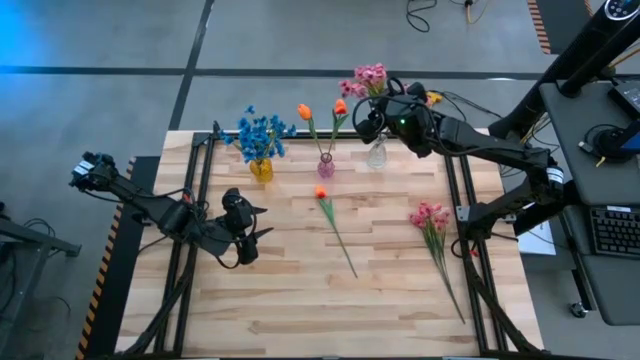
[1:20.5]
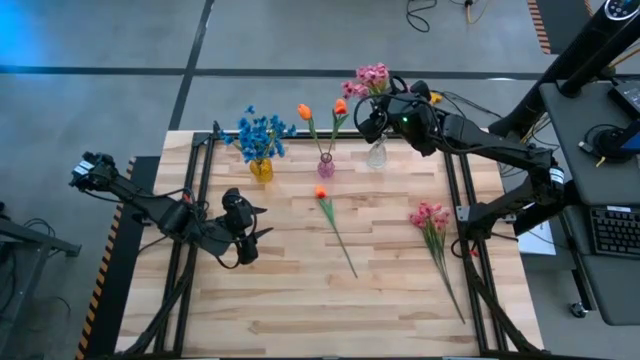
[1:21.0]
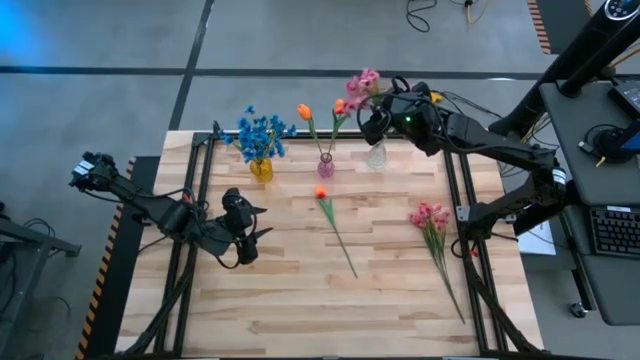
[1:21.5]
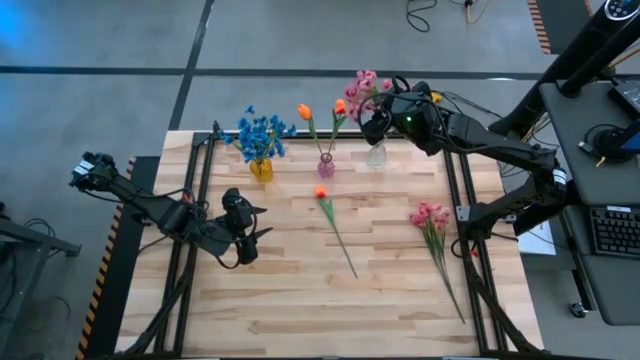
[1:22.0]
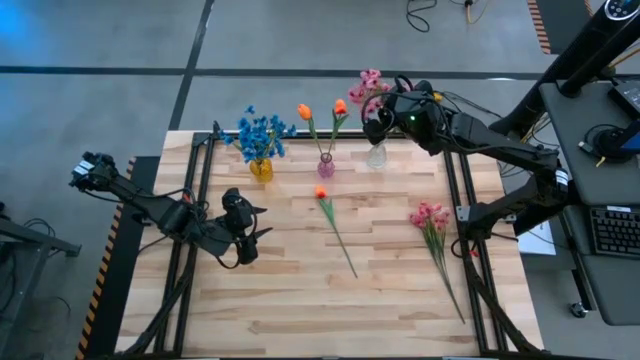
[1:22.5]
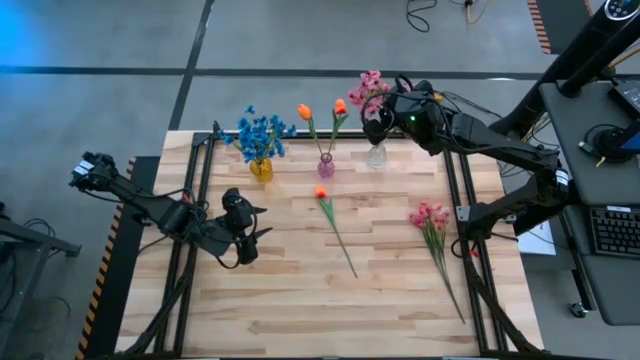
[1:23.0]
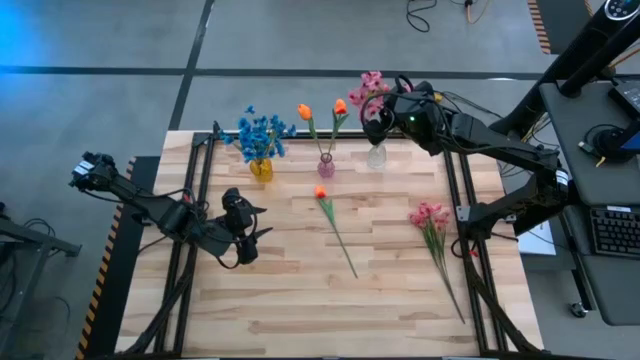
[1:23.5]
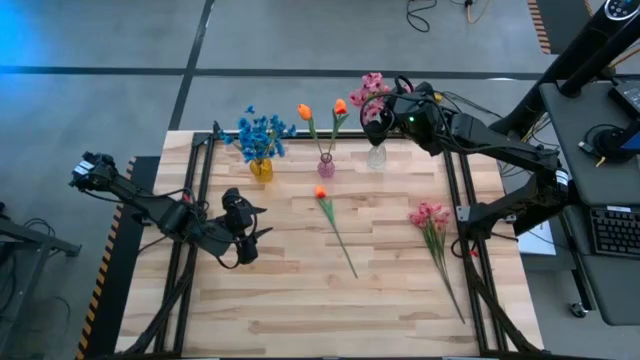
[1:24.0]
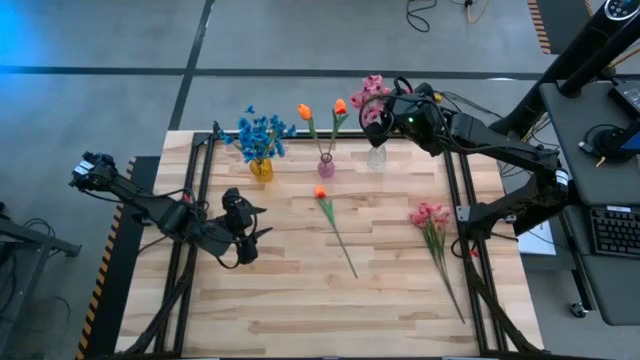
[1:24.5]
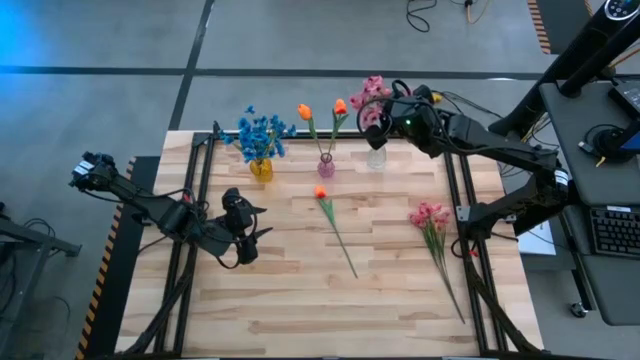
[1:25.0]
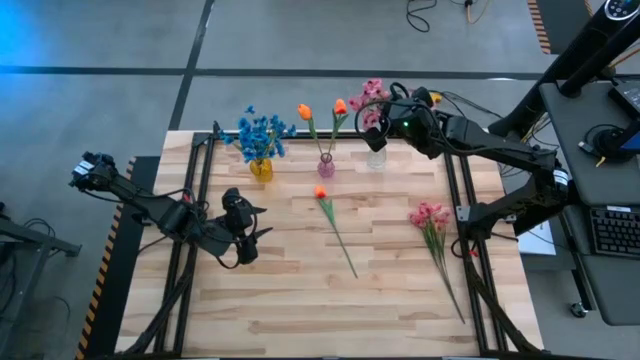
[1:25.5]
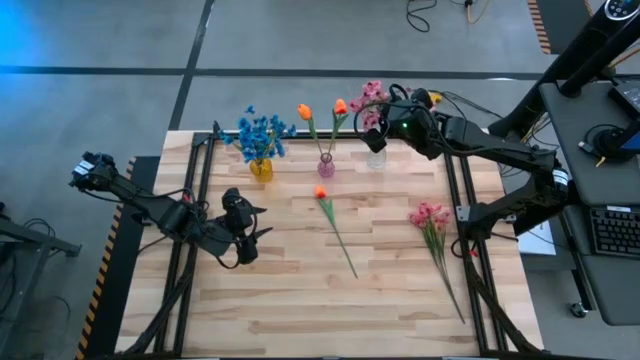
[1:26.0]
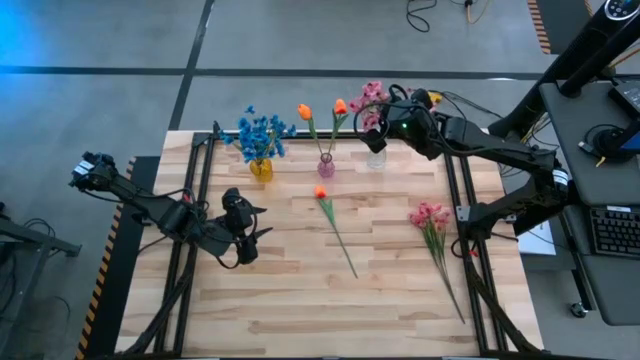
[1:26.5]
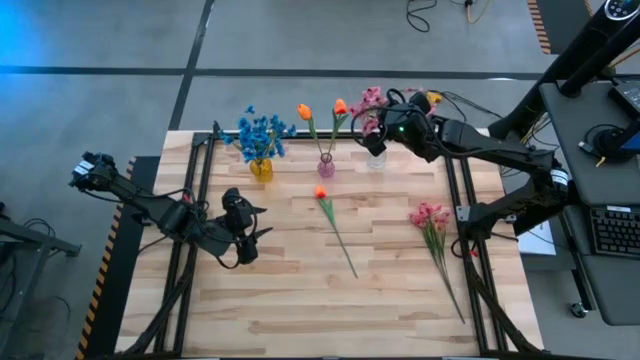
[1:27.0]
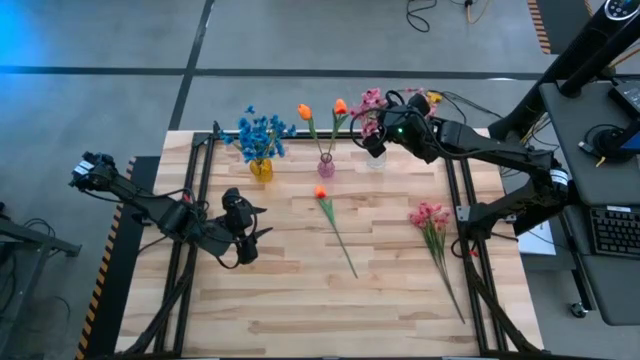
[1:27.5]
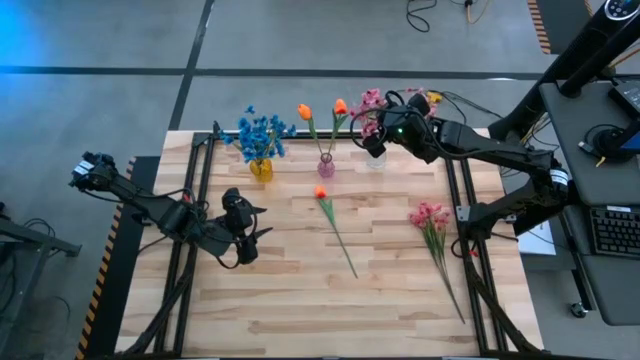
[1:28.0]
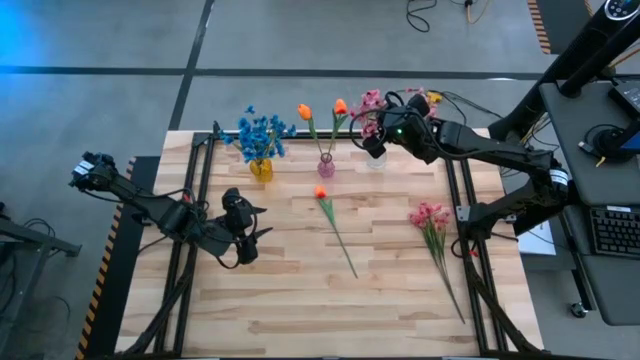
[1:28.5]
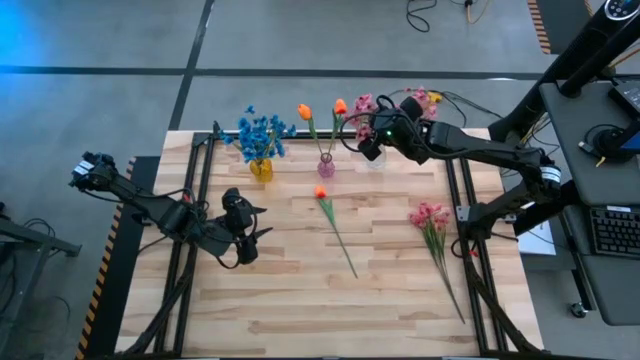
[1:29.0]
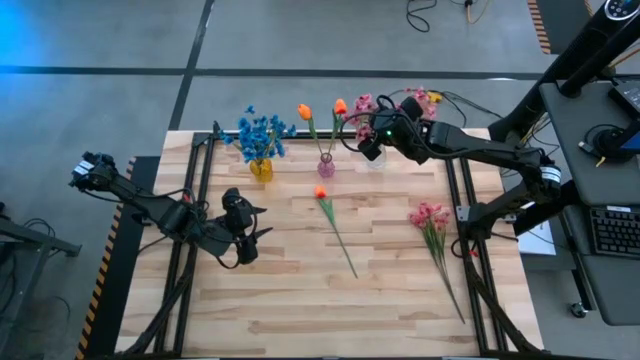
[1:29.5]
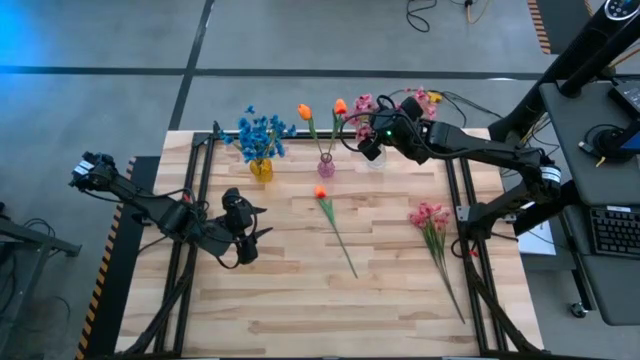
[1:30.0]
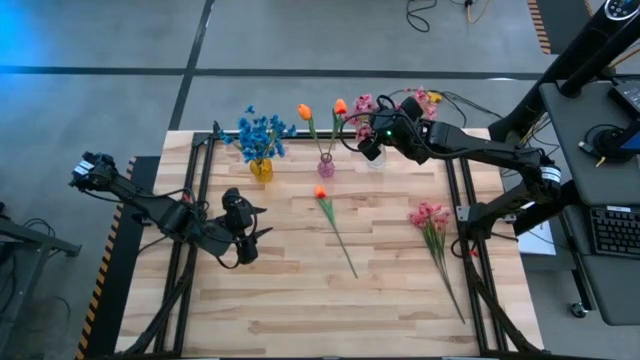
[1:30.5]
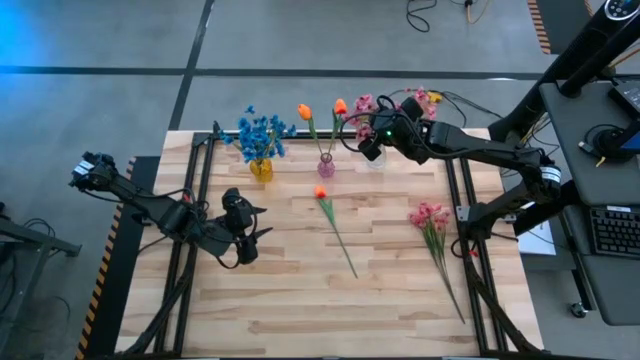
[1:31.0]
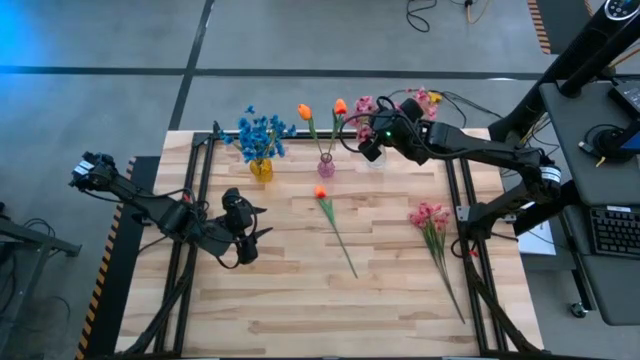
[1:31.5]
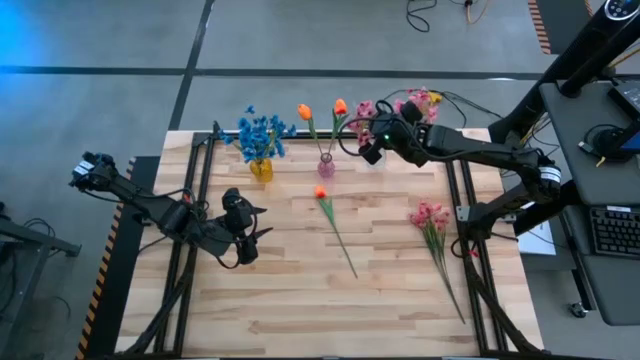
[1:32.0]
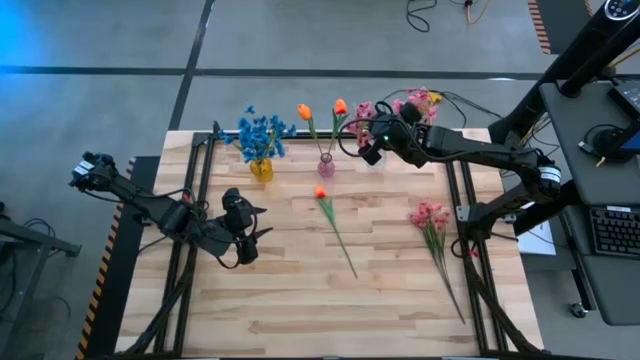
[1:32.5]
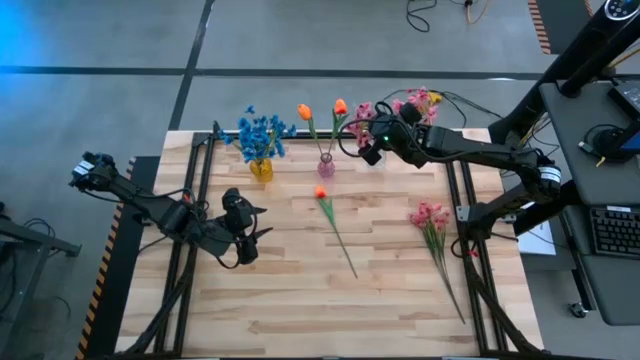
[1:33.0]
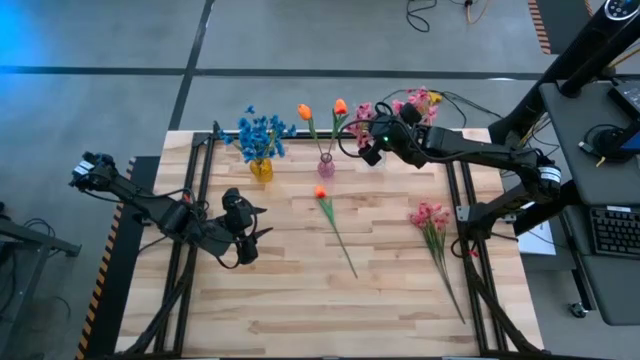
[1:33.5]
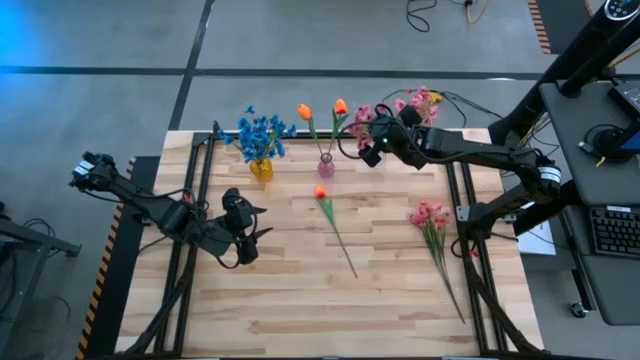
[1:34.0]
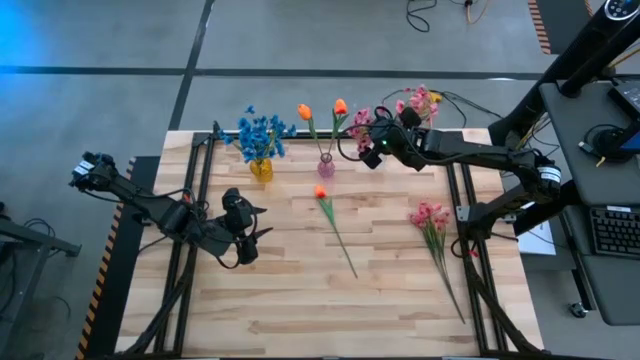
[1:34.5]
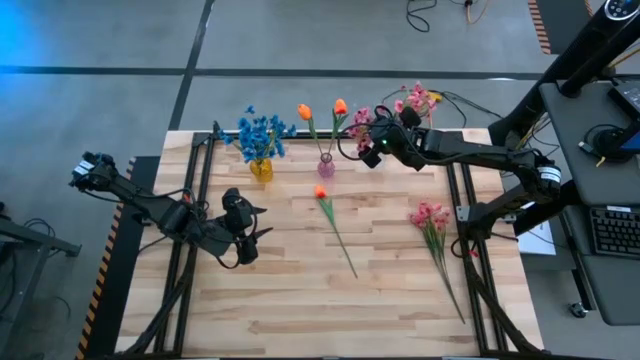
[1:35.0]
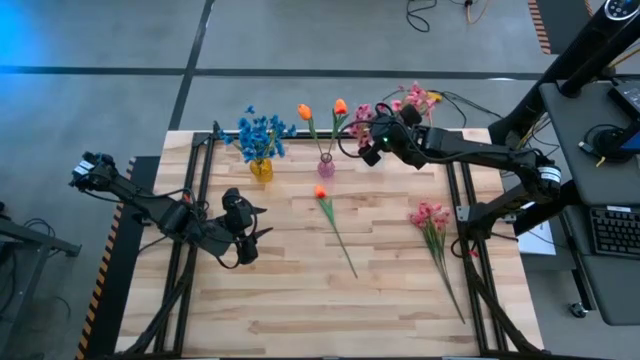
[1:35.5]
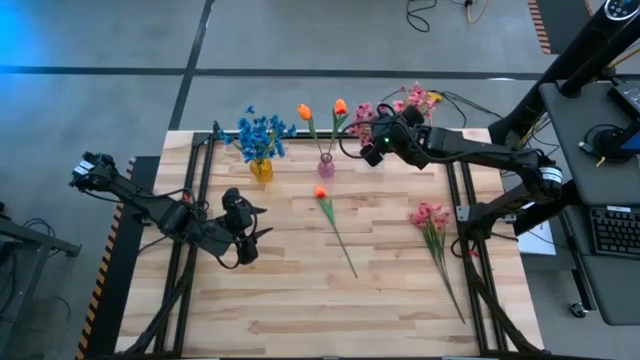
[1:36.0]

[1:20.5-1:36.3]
Task: Sort flowers into vase by color
Put the left pink flowers into the transparent vase
